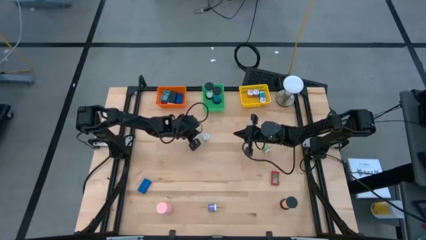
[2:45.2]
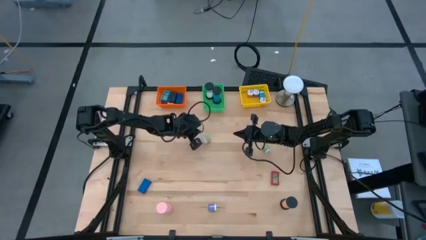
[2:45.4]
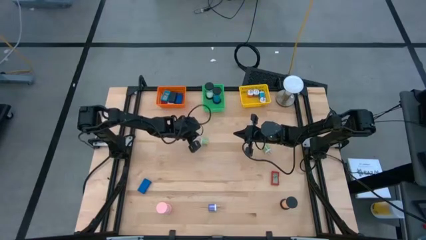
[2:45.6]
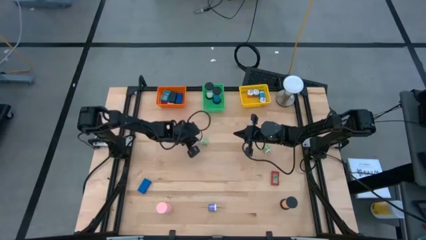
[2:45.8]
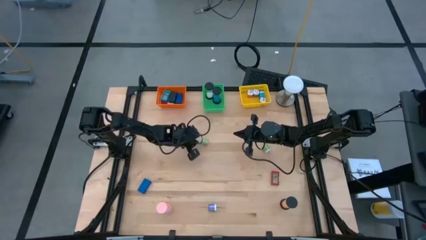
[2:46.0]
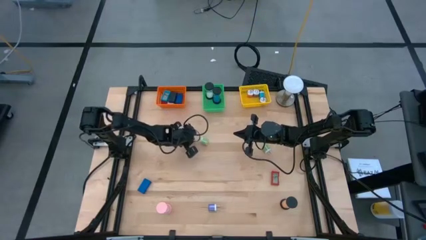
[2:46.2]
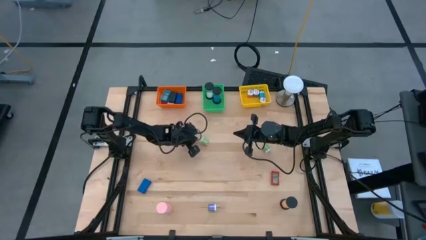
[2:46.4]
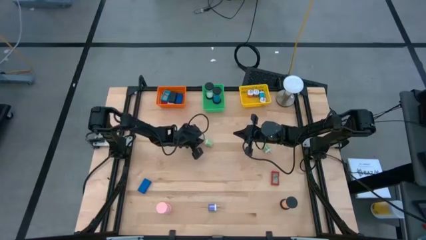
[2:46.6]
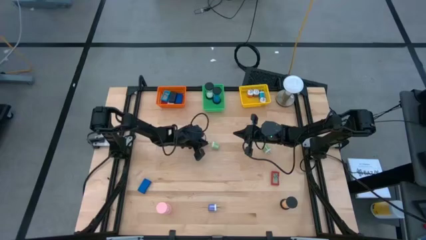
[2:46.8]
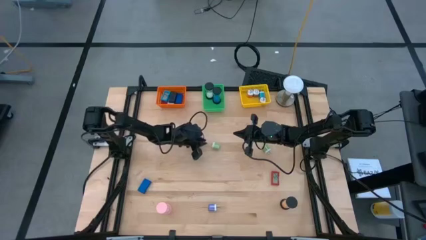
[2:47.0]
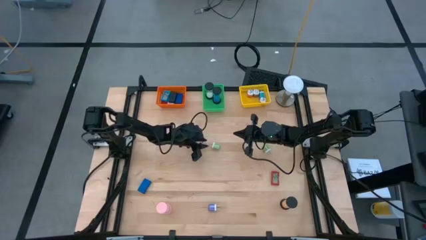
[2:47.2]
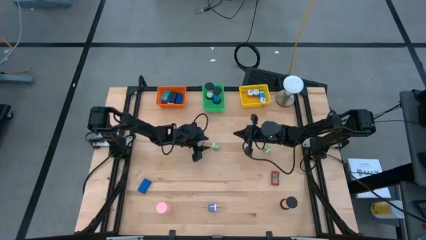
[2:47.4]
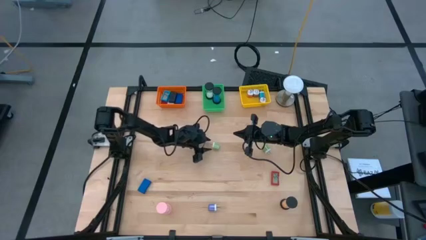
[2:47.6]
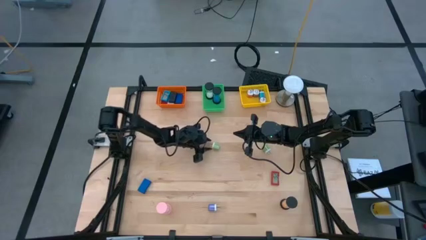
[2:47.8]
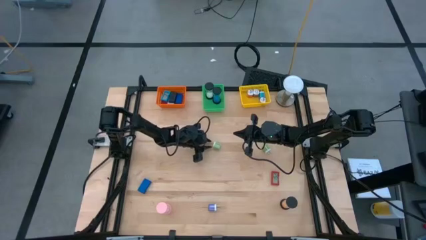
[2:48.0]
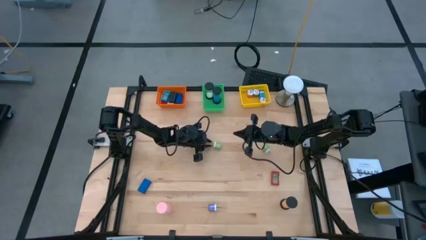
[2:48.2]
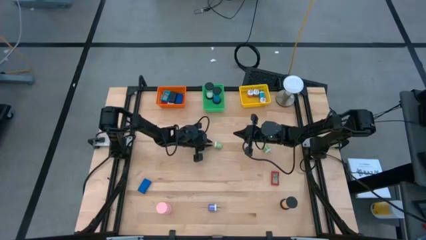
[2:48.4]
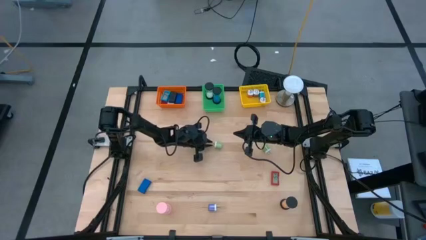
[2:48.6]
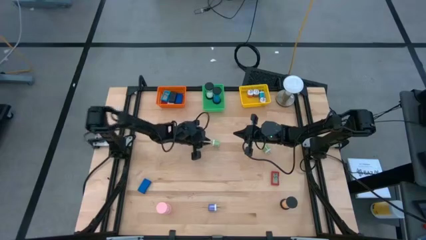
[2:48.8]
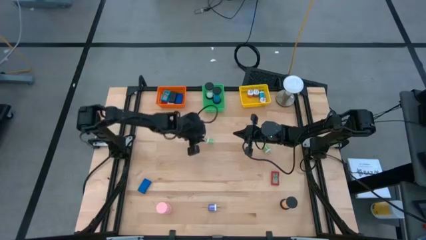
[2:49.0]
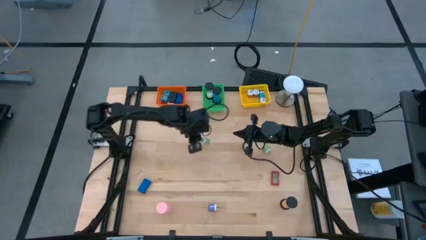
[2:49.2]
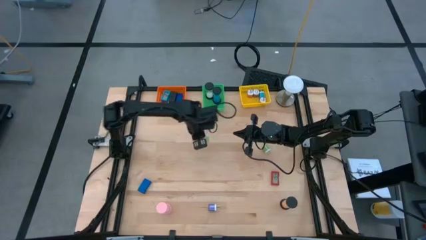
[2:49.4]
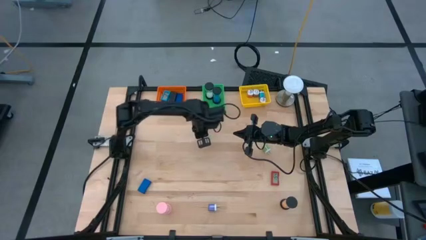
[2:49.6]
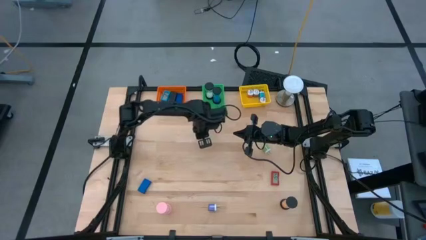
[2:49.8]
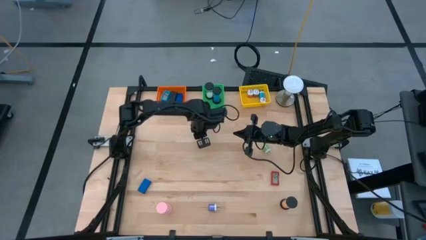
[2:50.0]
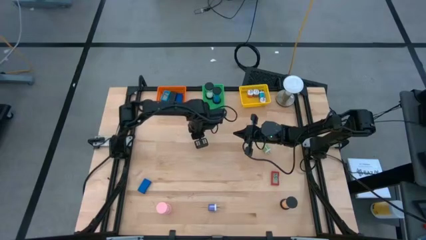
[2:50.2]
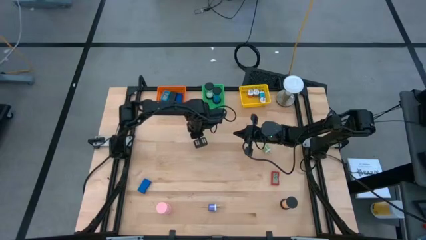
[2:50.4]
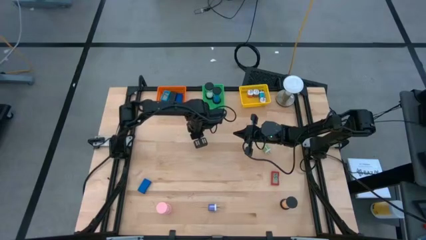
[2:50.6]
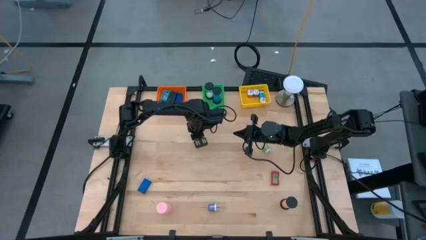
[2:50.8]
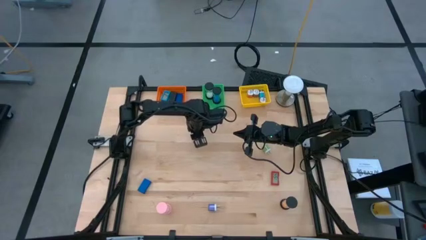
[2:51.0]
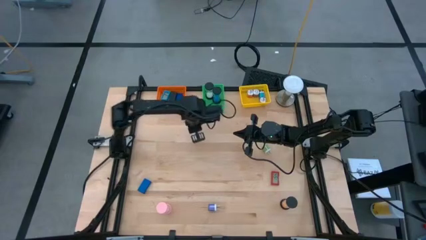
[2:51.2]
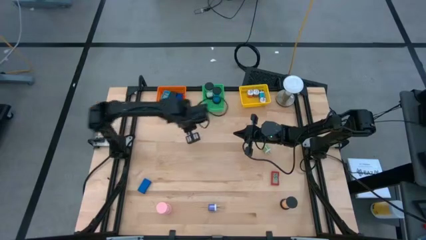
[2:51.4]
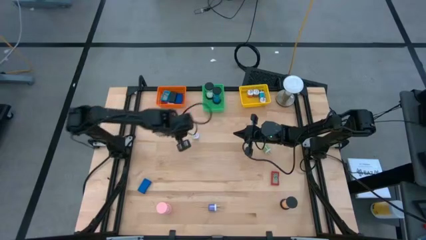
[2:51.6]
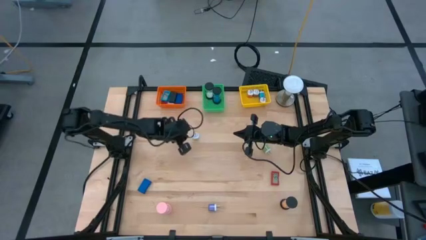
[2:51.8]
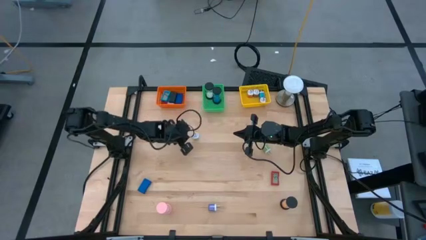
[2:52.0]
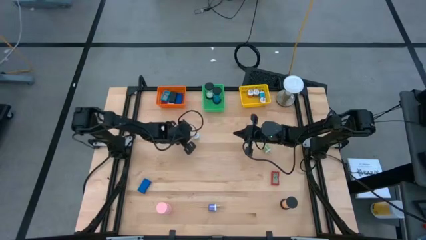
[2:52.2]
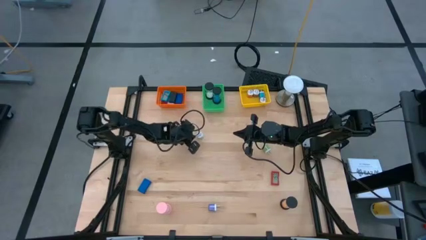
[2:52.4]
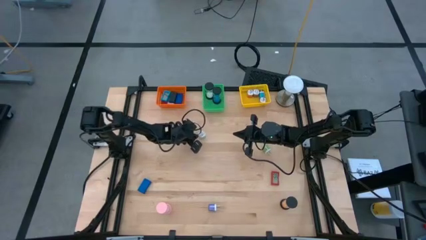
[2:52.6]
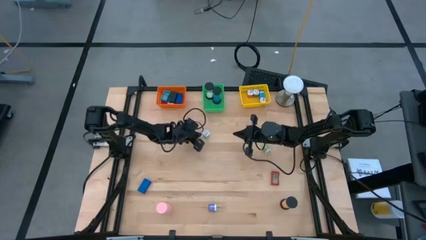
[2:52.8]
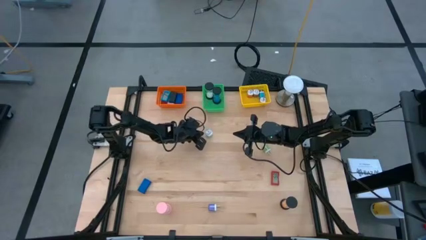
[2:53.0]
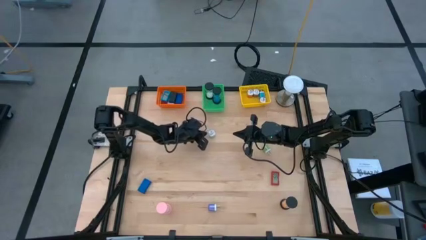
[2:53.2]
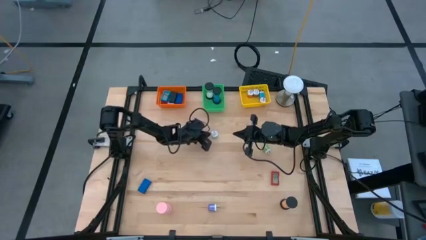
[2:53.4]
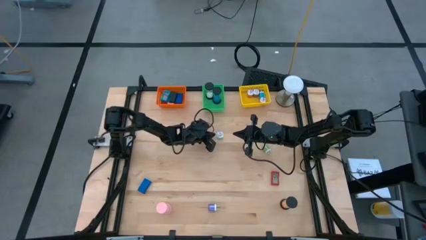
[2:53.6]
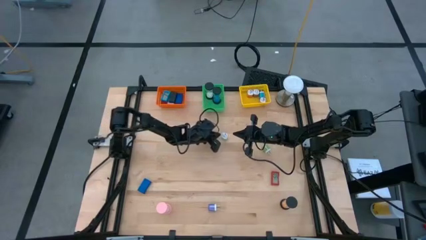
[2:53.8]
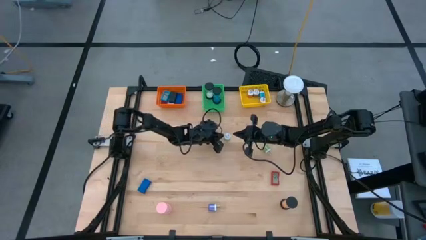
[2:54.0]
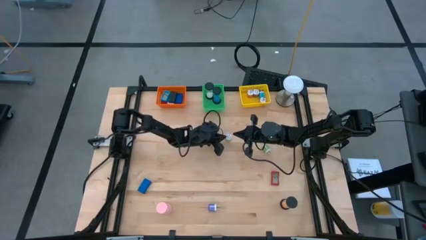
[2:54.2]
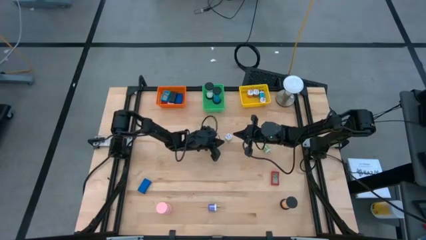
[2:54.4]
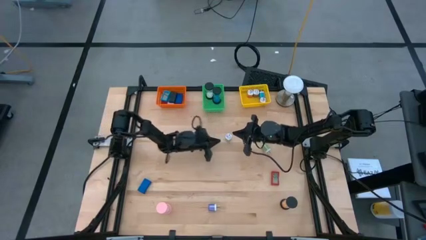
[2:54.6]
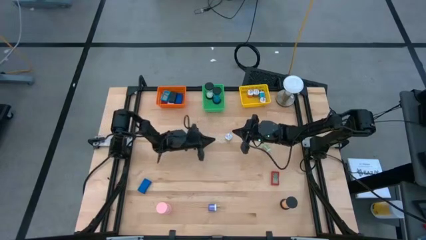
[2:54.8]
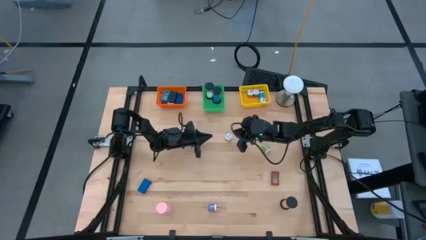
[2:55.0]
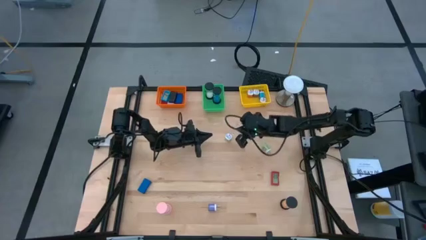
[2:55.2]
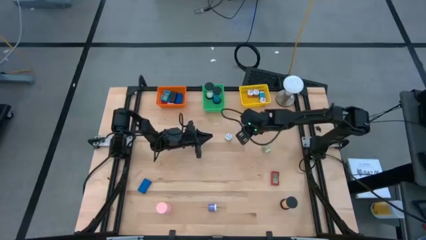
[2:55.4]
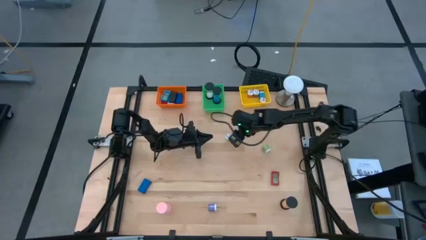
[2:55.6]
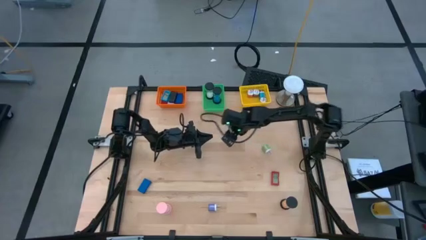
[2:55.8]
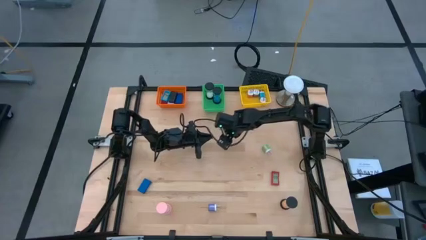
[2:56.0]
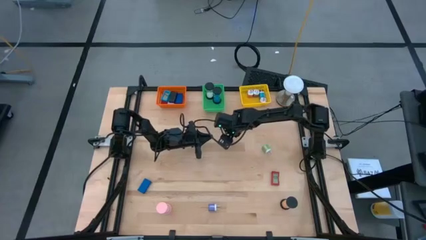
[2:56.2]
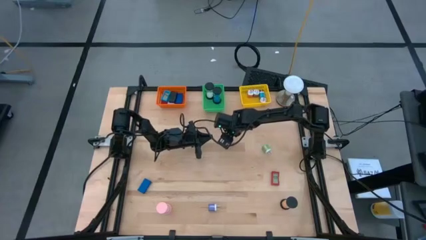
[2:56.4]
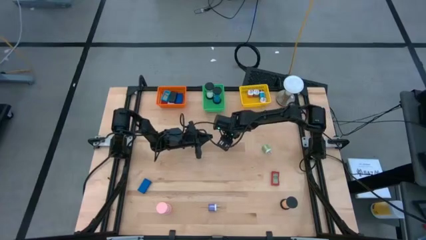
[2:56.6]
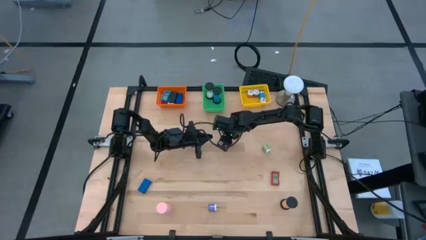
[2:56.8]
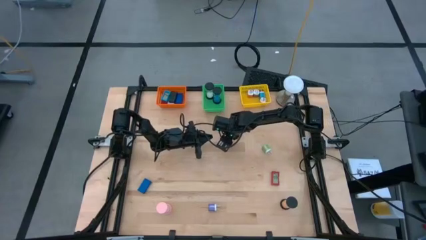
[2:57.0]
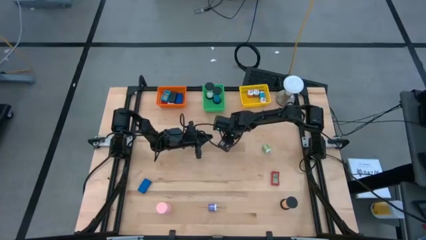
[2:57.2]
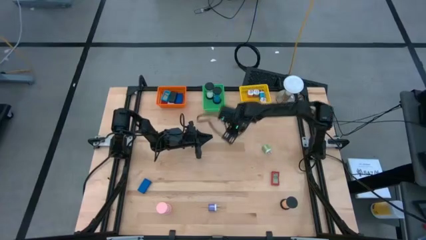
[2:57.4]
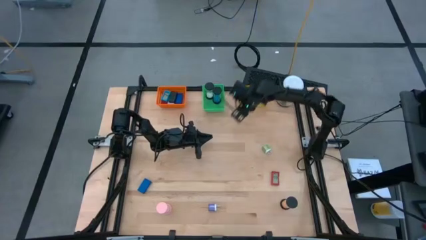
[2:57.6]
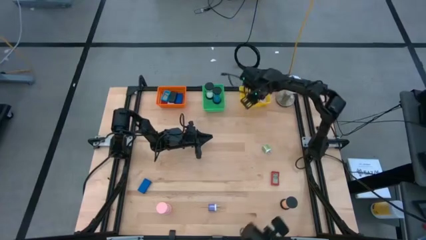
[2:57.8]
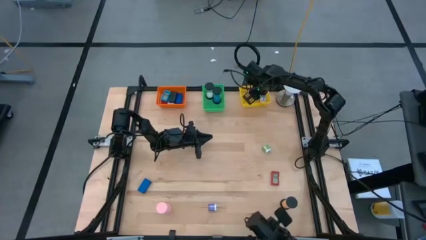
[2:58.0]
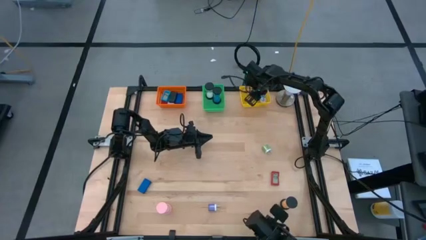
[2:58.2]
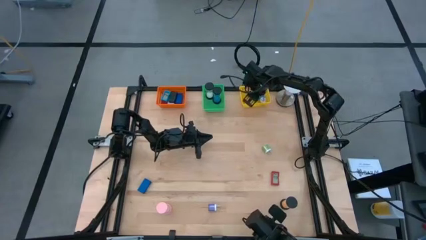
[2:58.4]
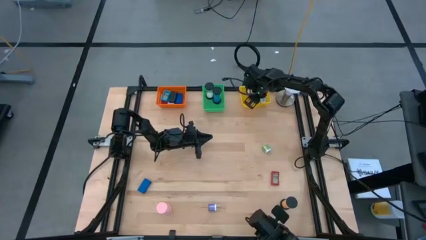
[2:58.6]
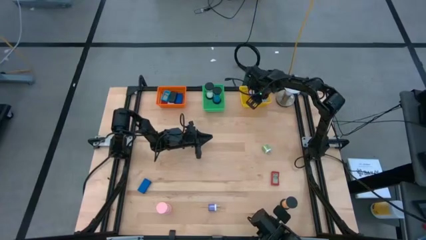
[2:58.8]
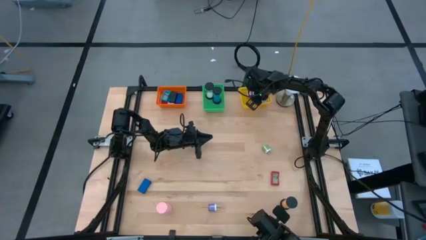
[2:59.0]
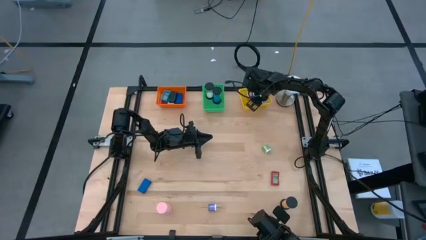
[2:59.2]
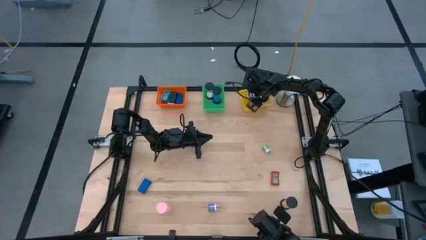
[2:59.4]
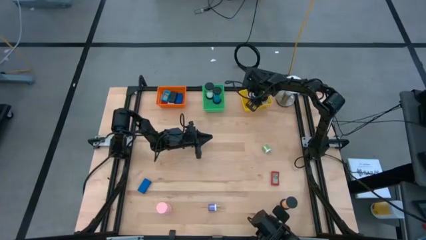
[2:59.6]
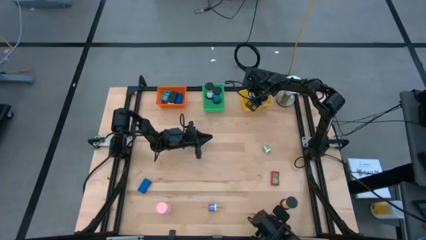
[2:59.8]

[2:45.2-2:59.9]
Task: Pick & Place Office items
Put the top green charger adapter into the yellow bin

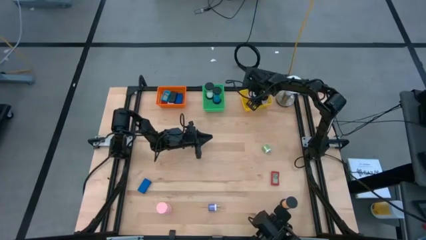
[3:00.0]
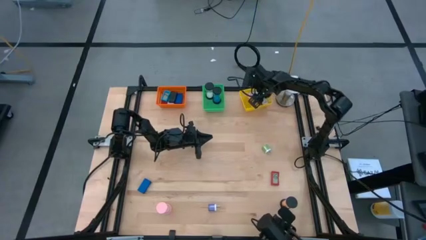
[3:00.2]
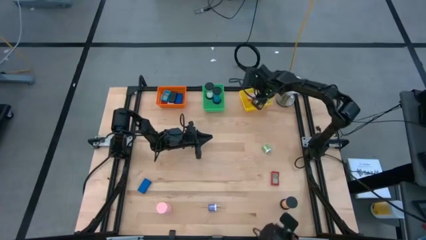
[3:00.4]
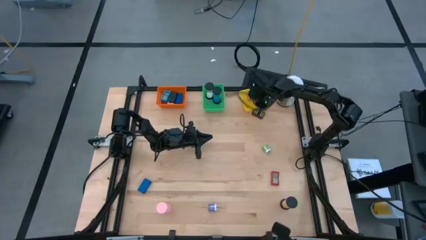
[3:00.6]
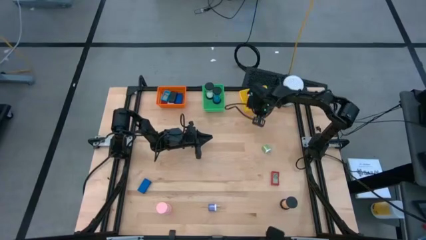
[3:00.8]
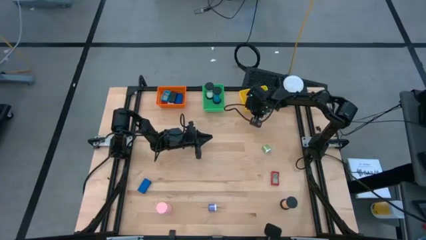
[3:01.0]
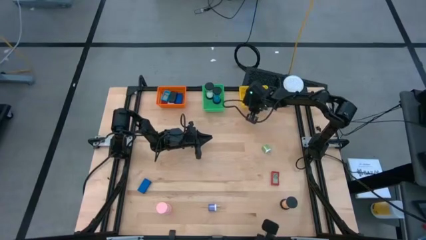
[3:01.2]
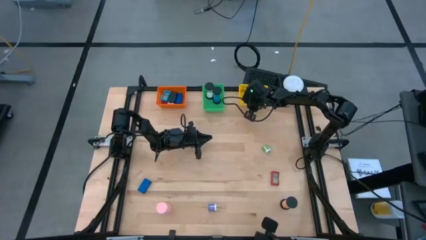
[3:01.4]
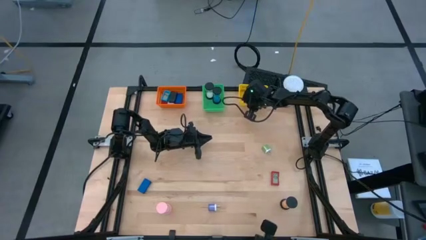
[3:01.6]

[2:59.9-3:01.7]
Adjust the yellow bin on the table
